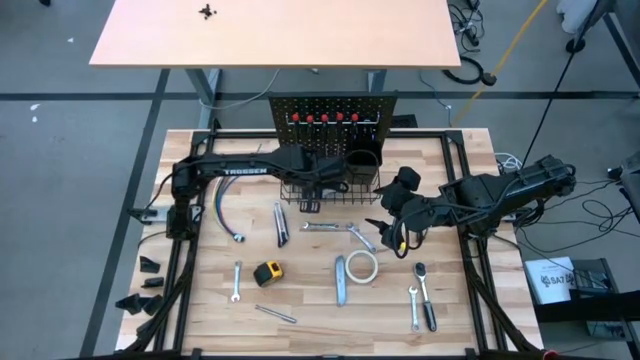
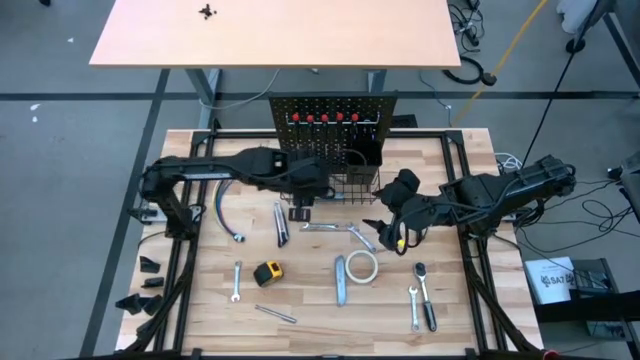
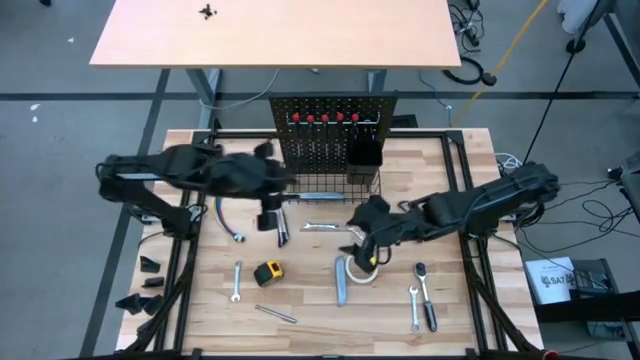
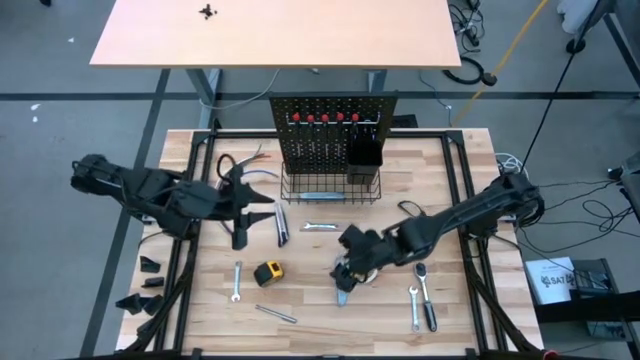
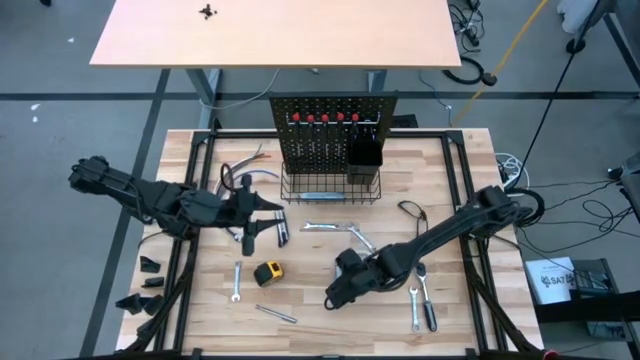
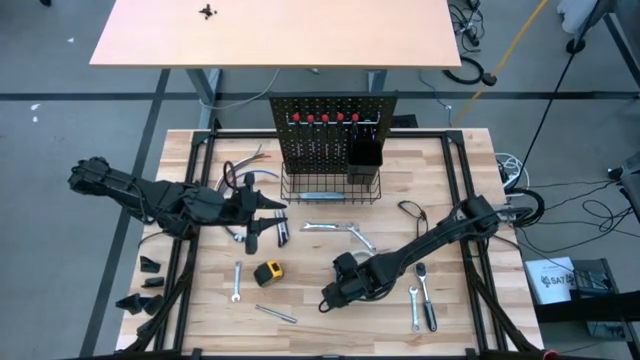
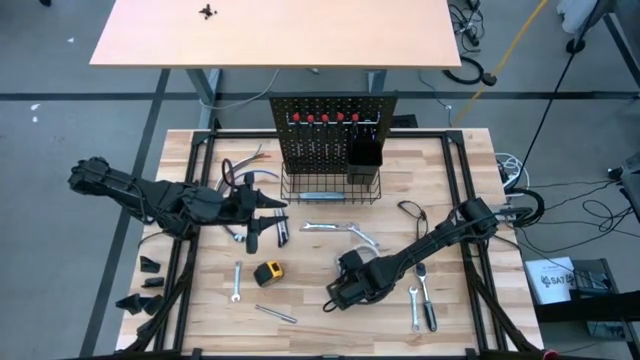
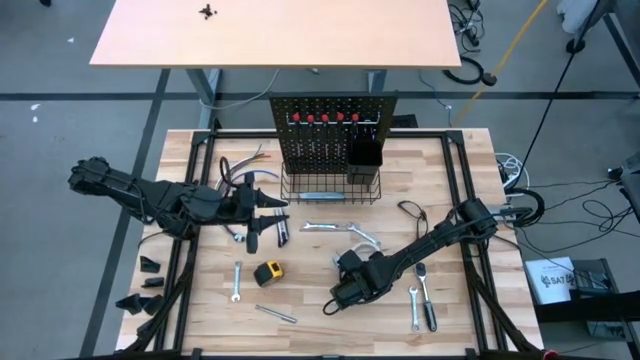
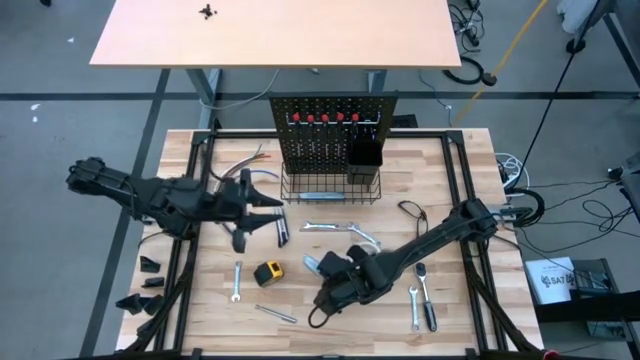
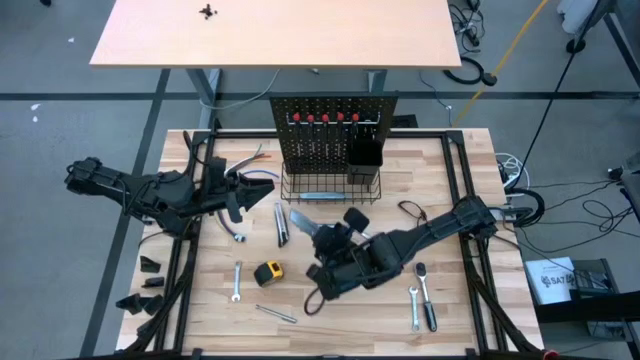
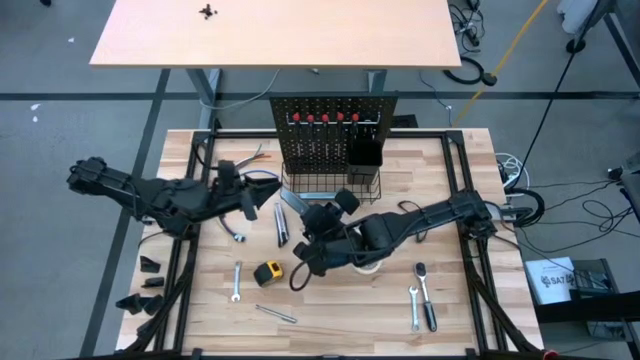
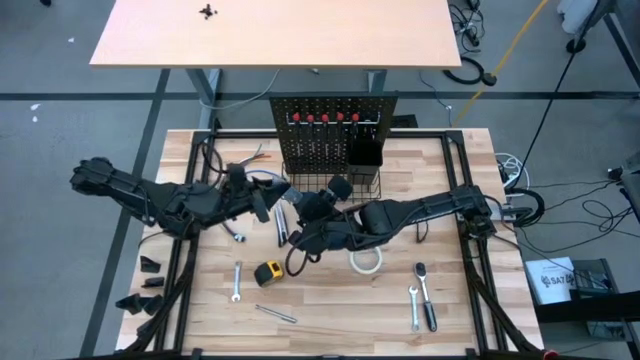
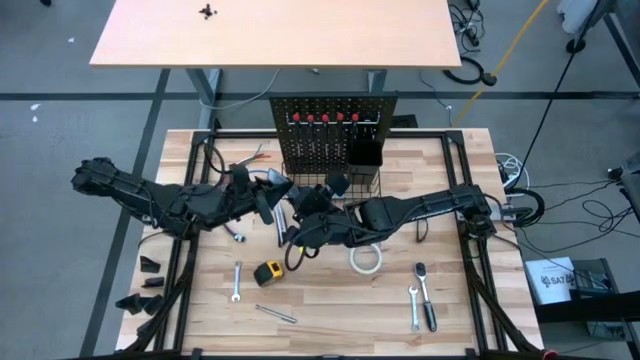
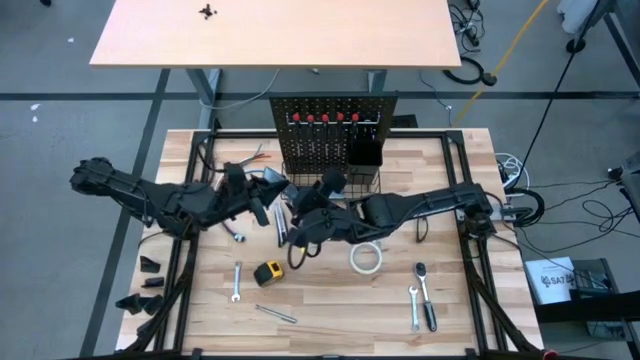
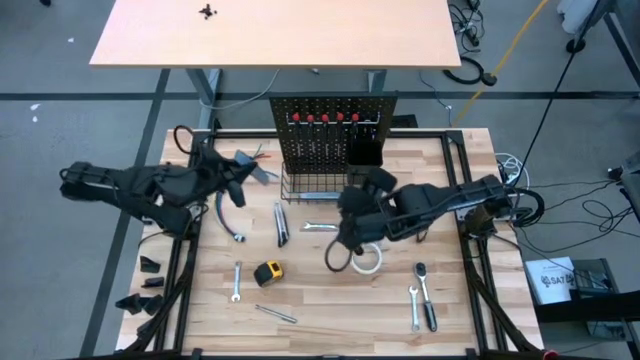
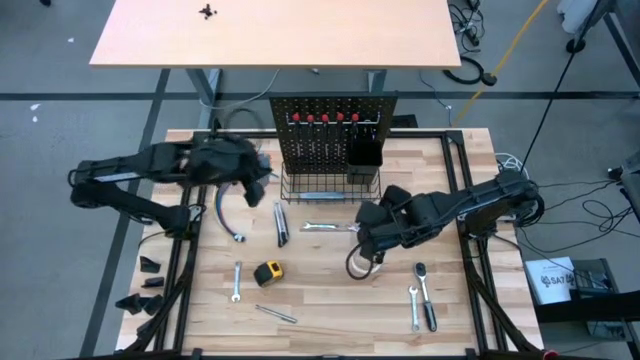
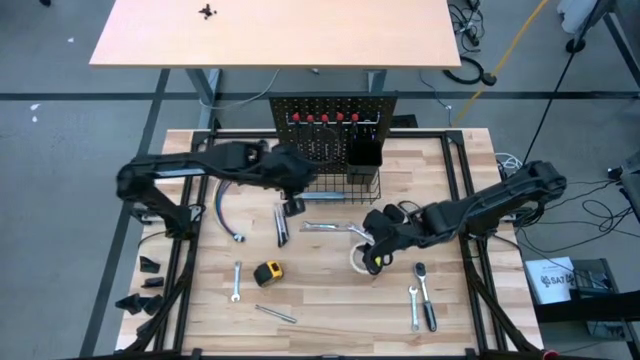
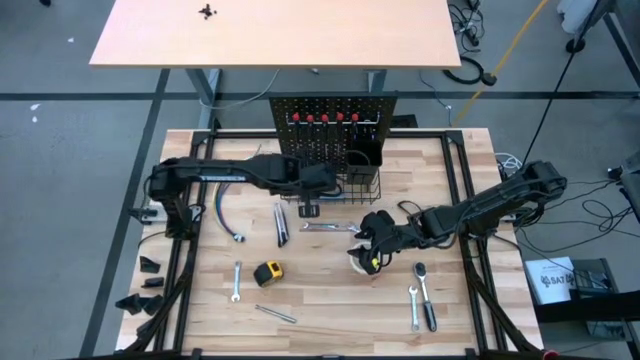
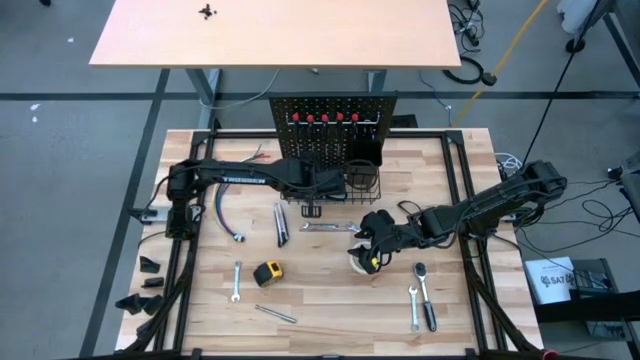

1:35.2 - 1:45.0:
Task: Hang tools onto peg board
Put the silver utility knife into the pegboard basket

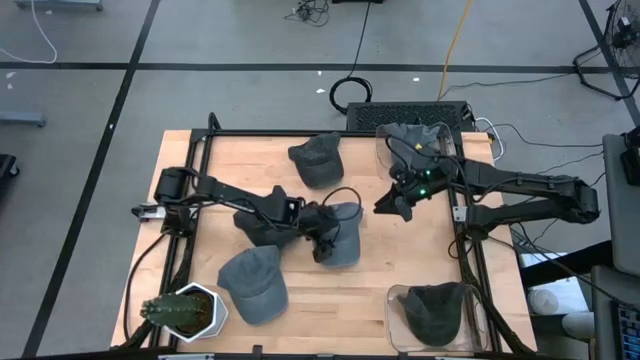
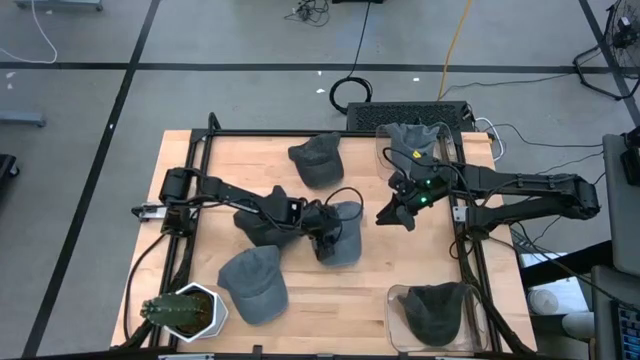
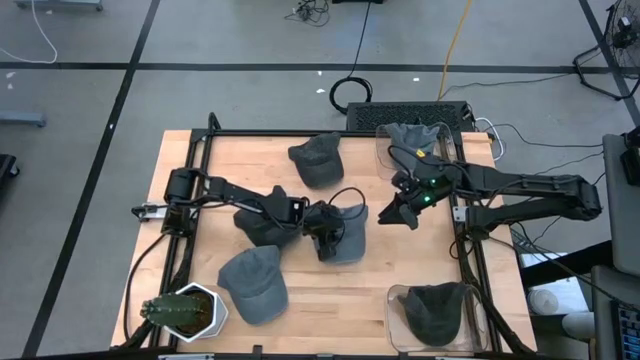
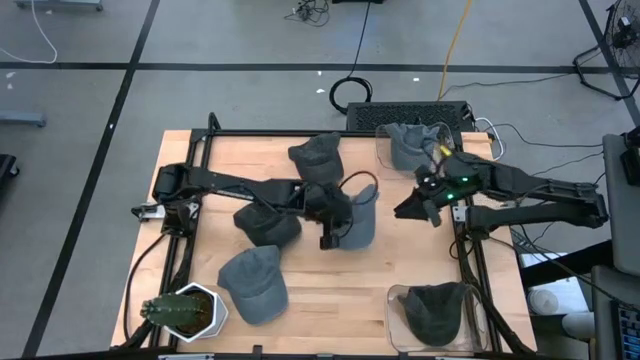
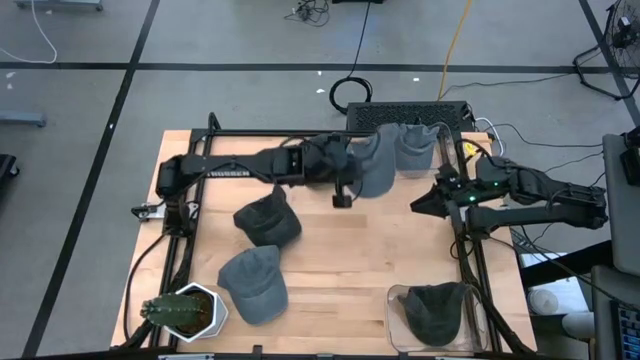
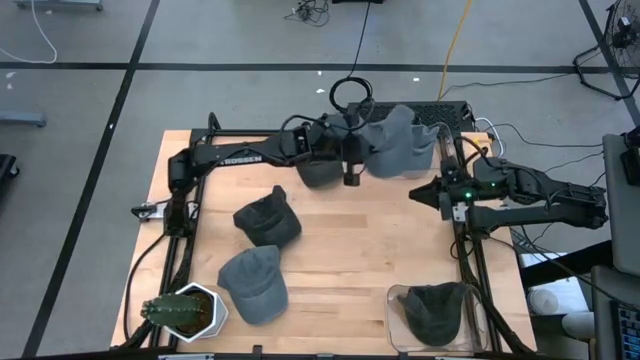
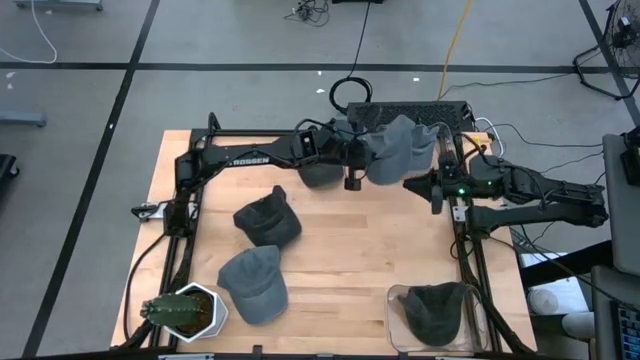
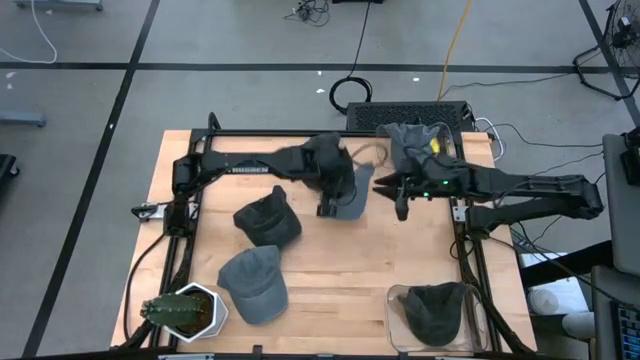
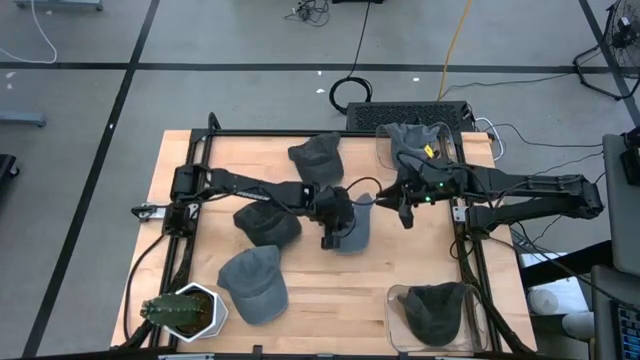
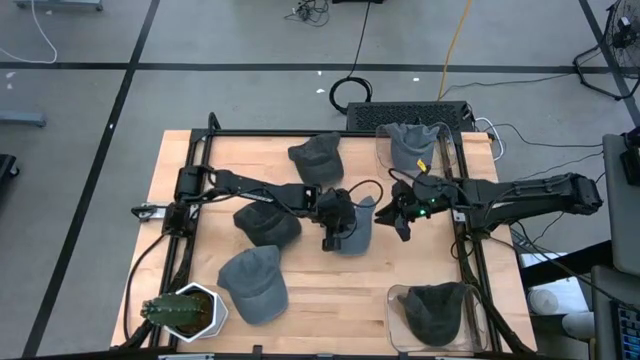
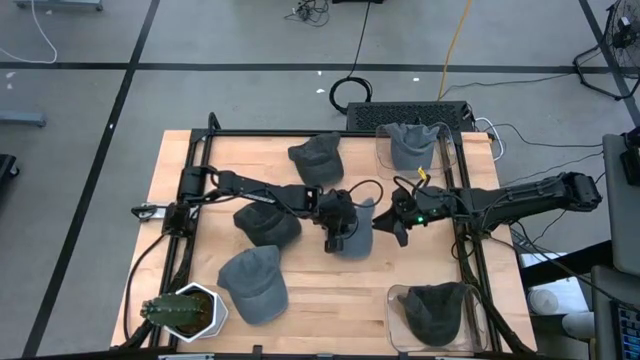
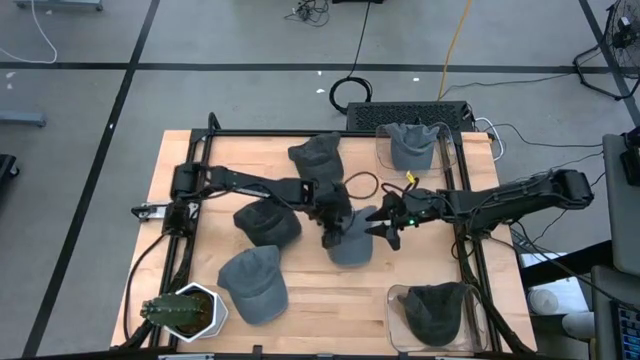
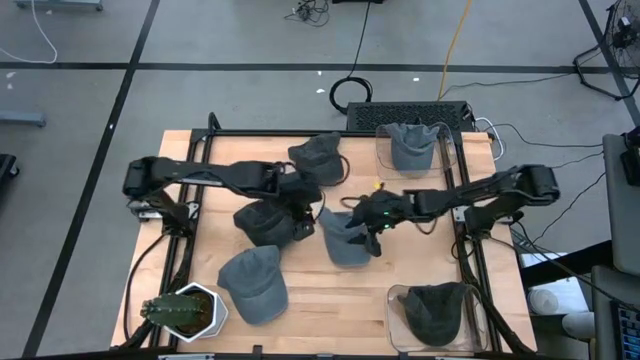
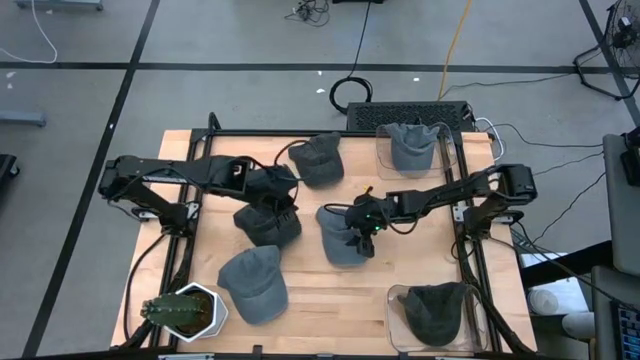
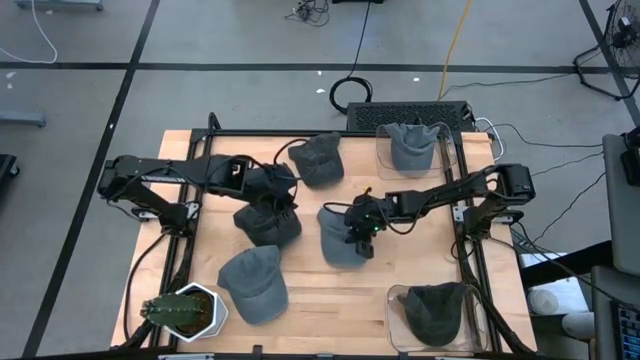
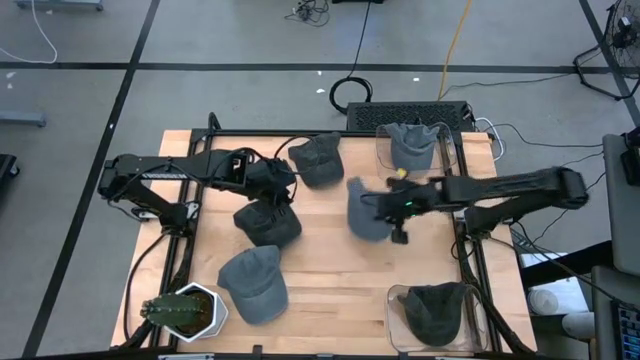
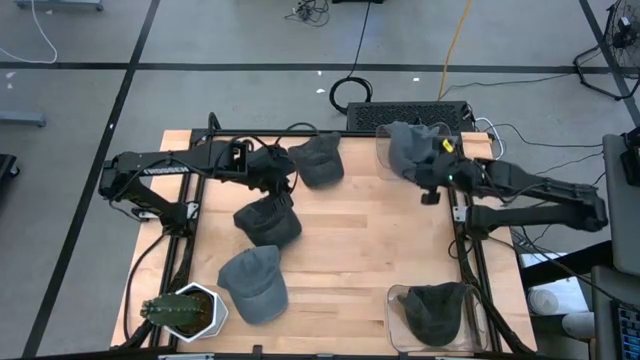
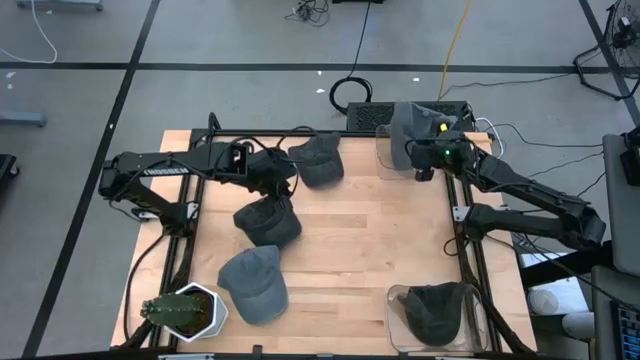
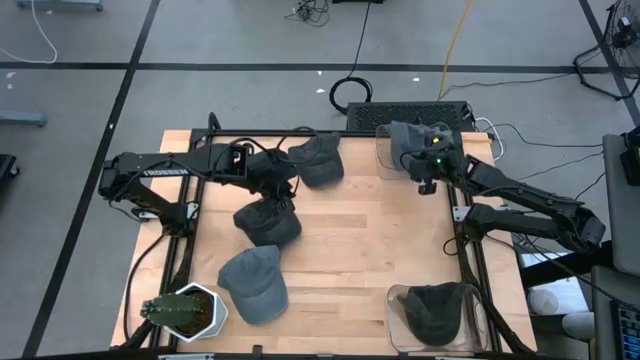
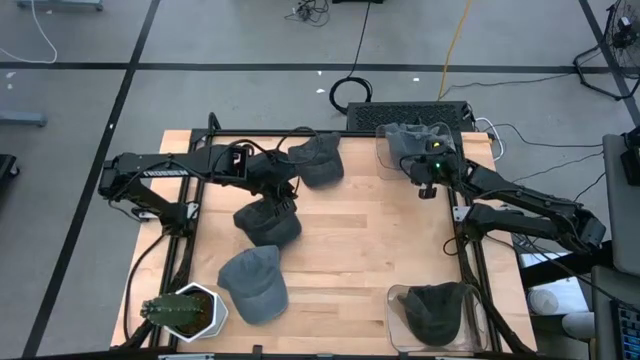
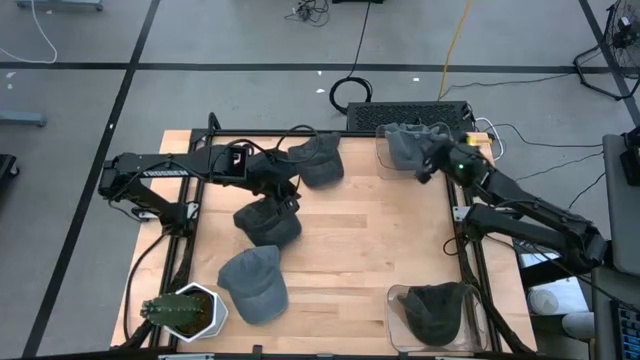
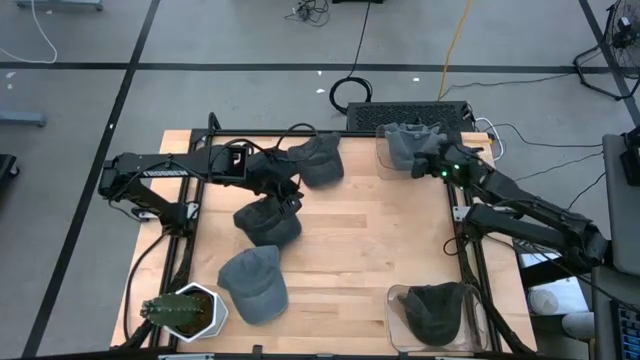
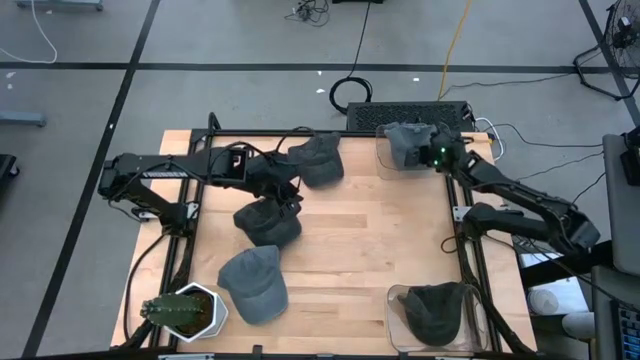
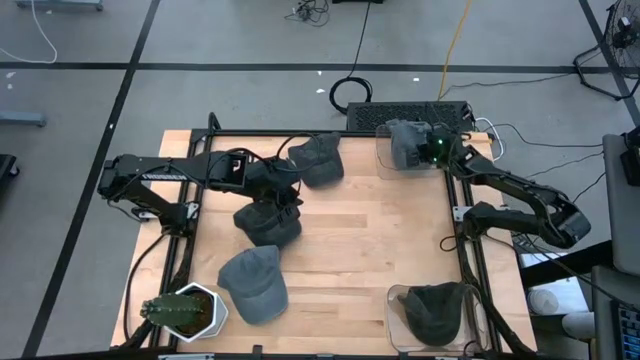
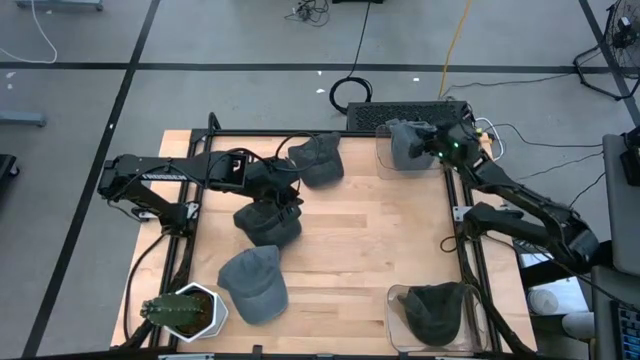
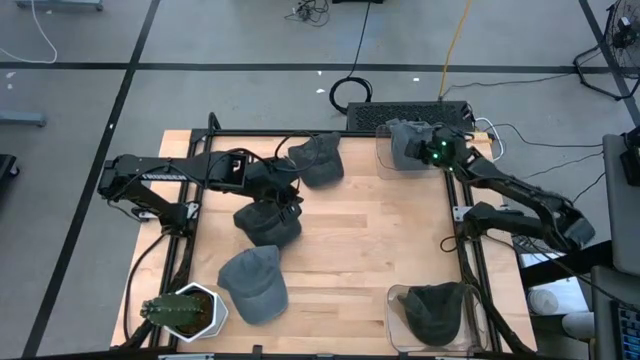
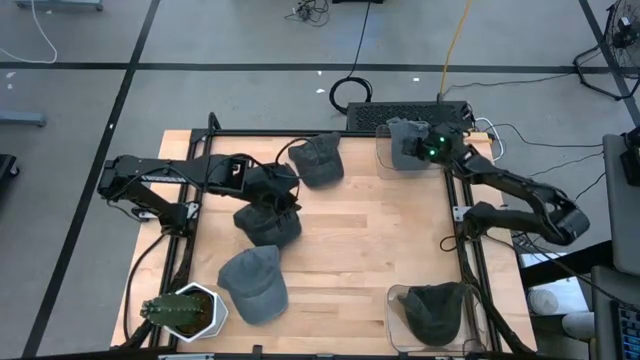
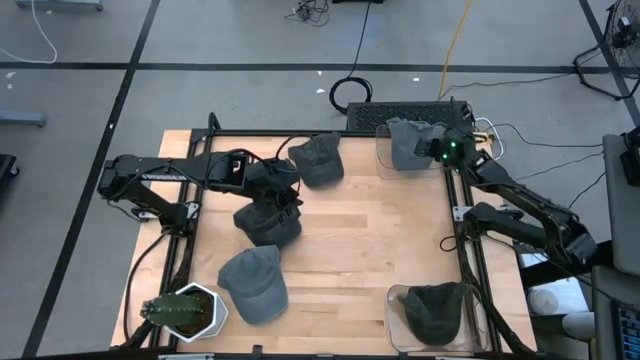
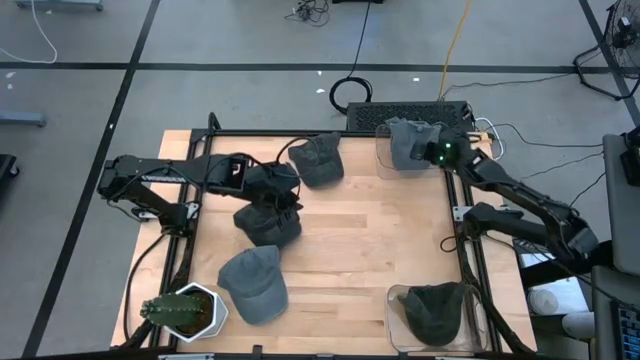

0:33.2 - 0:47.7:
Task: Pick & Place hat
Put the top gray cap into the top transparent bin
